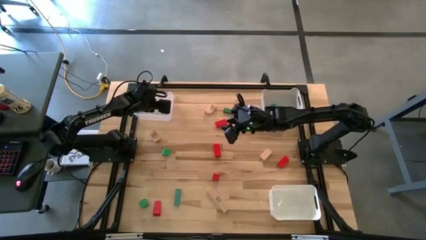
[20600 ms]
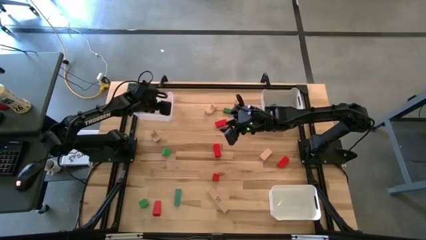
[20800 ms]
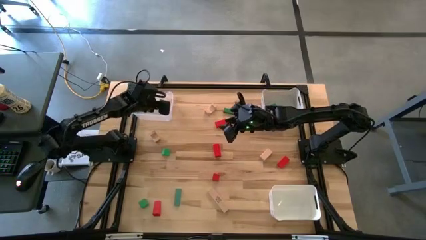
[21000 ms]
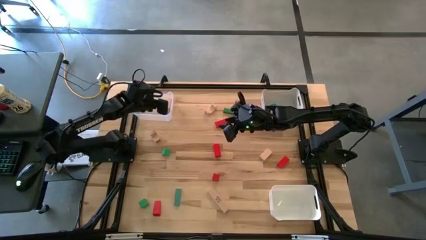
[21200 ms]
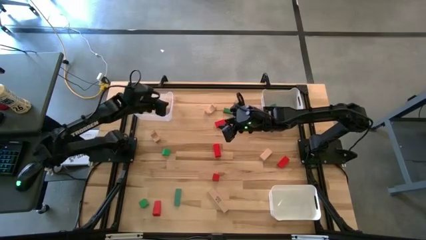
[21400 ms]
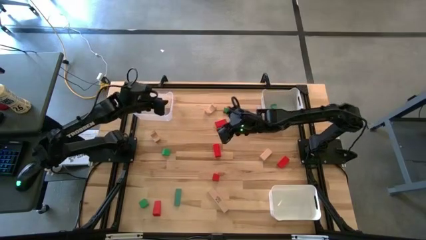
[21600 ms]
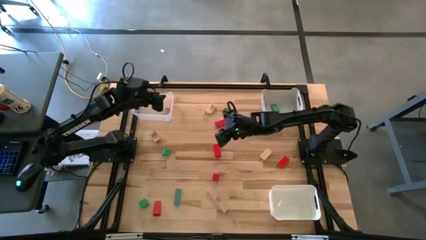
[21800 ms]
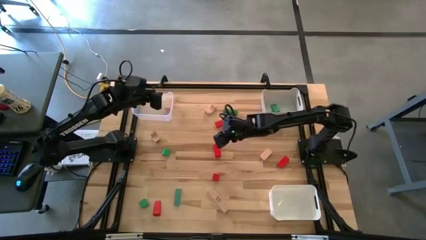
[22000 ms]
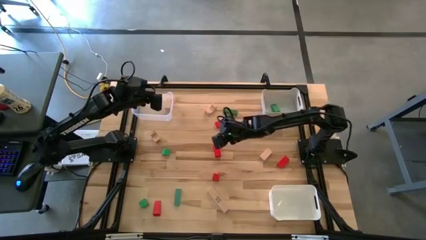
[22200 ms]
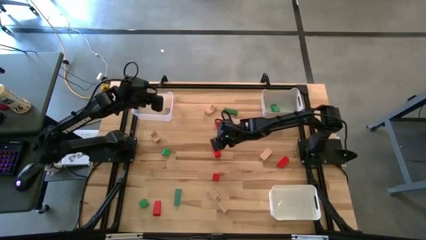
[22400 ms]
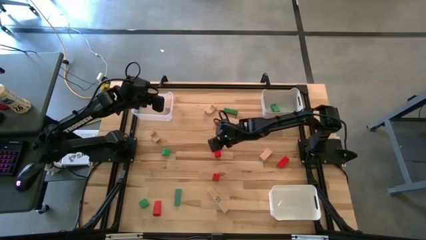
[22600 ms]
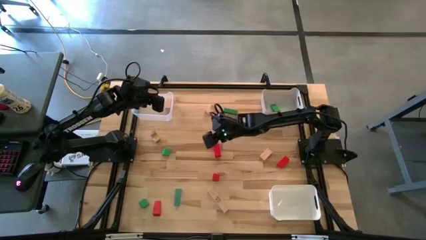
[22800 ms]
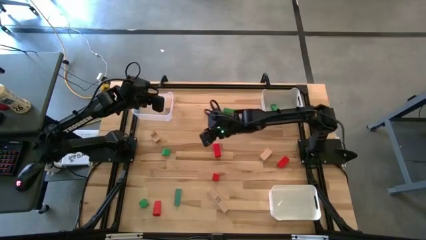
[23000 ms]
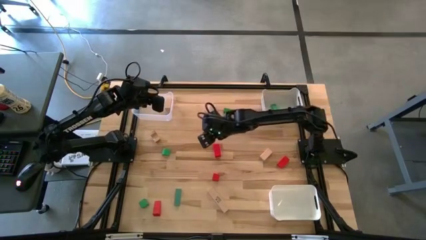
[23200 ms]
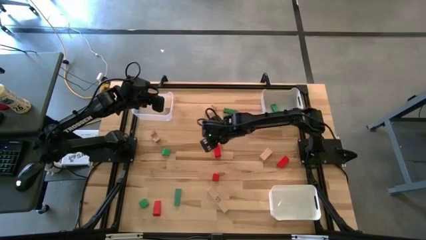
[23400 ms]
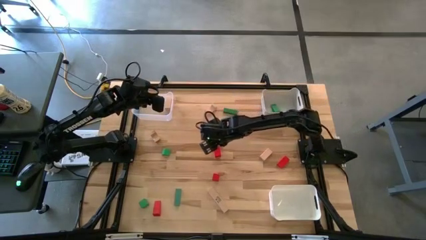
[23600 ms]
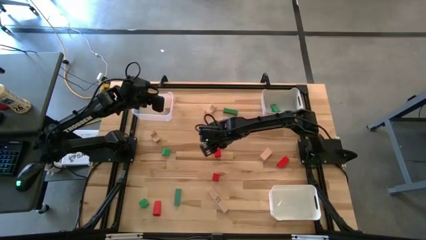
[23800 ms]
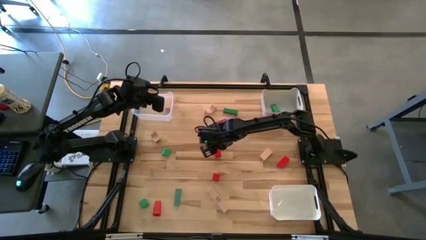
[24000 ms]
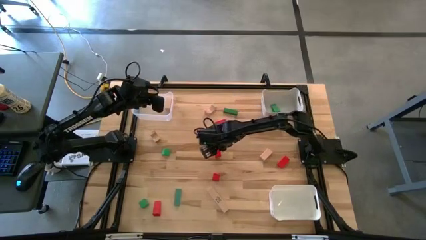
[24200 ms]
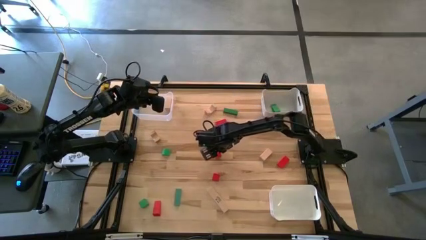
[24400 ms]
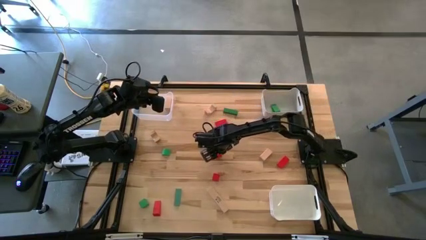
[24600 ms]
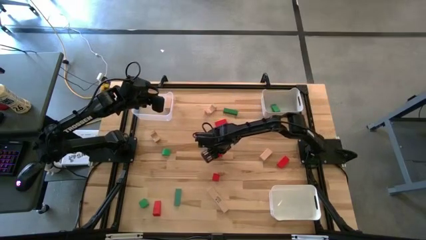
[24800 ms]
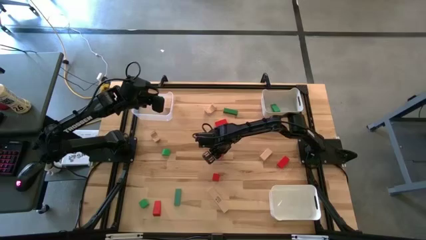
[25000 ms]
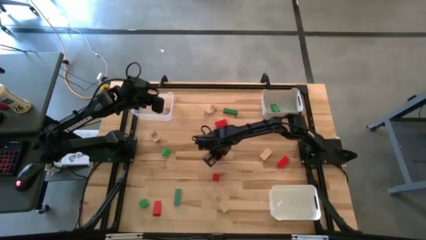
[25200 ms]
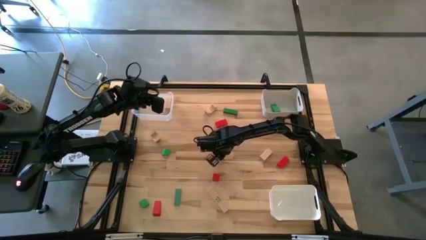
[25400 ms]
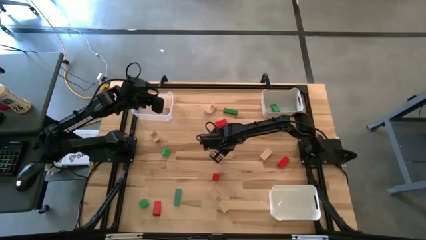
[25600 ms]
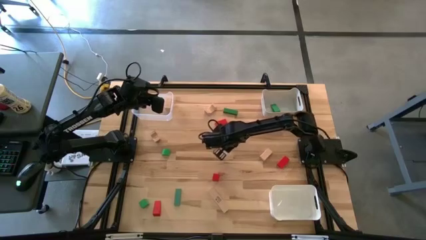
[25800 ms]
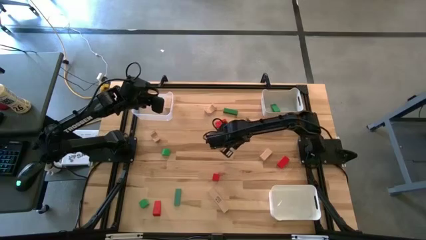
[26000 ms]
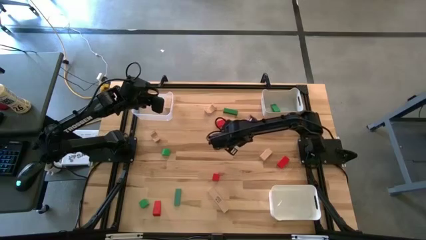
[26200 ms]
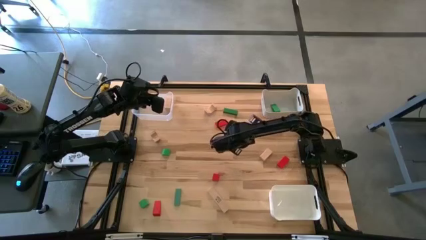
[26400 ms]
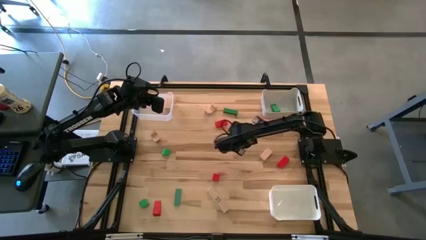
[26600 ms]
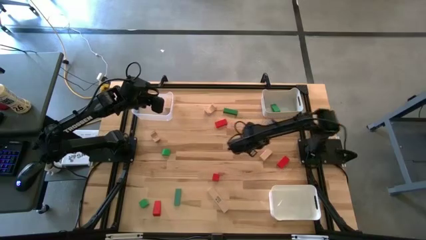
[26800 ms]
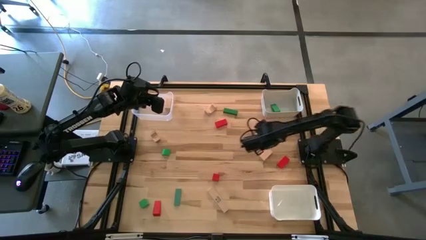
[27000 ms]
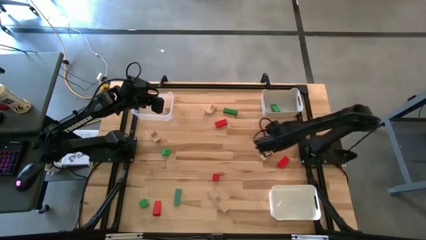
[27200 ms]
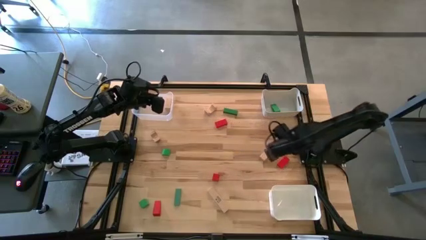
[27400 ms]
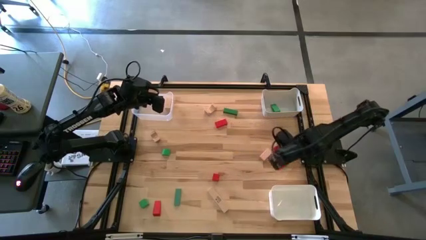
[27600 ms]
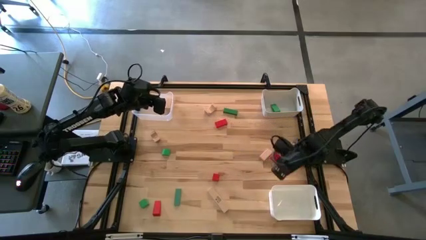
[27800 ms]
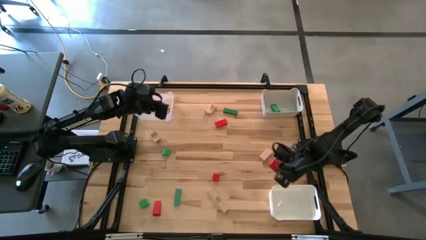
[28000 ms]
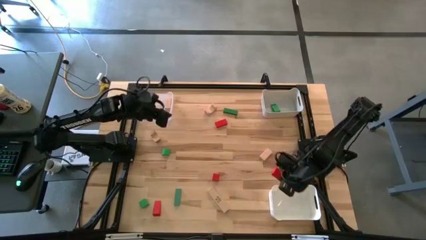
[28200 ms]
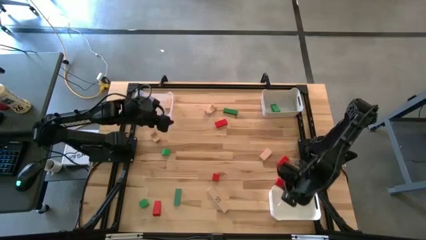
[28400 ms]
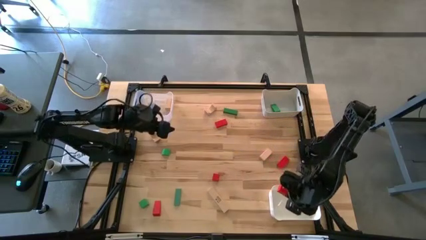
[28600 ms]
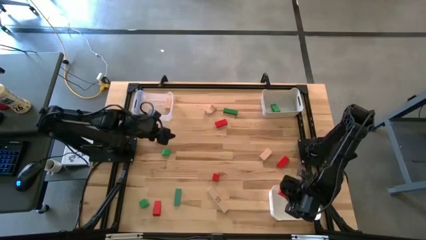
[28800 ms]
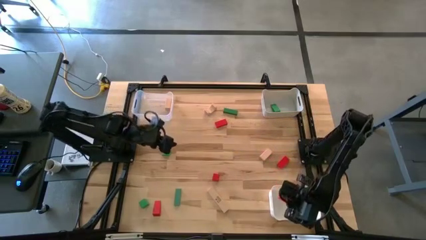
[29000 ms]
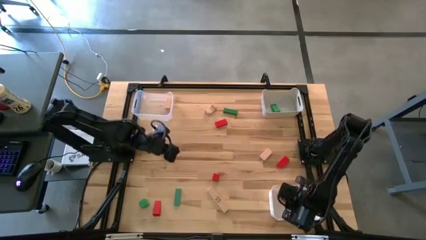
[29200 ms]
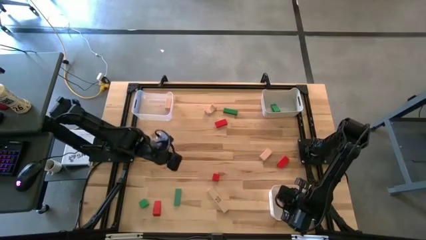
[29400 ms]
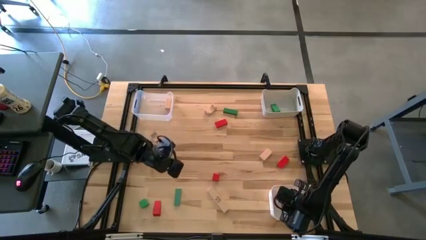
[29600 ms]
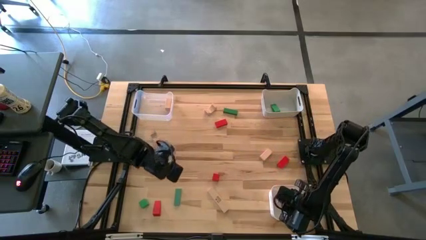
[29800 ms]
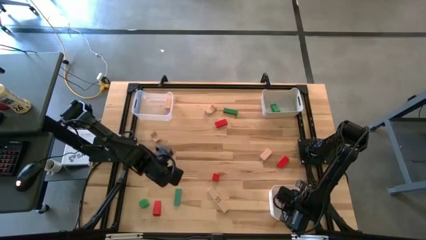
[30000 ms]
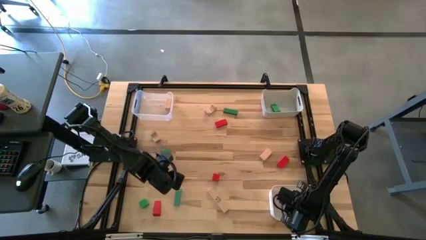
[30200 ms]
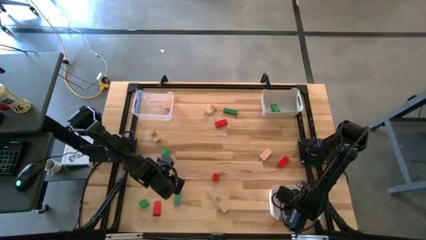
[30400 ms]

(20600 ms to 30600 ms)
Task: Sort & place blocks by color
Put the red block into the white bin
